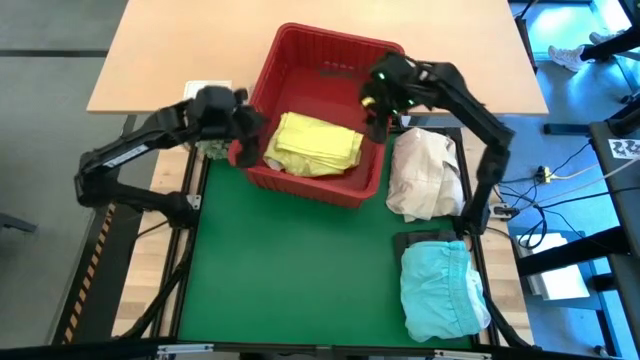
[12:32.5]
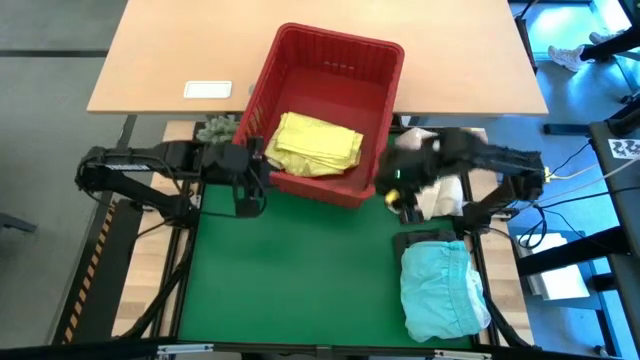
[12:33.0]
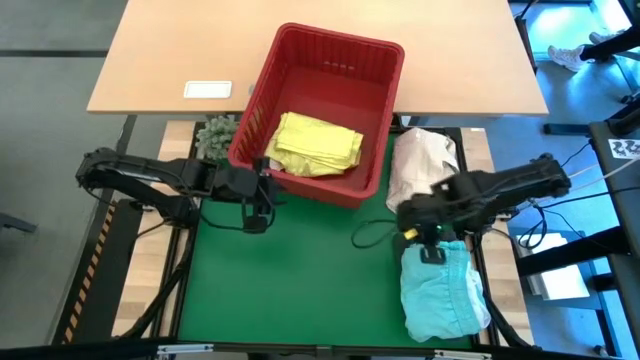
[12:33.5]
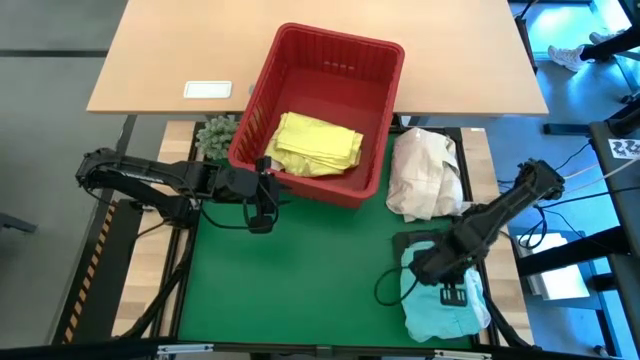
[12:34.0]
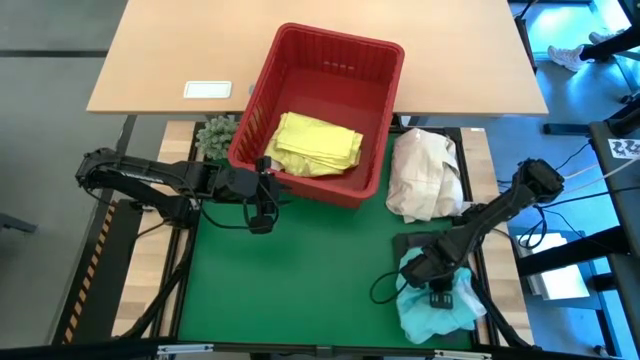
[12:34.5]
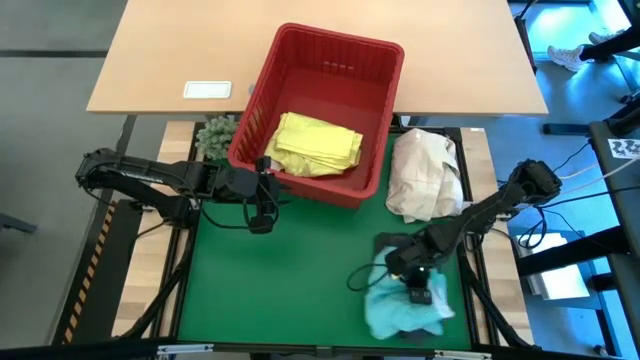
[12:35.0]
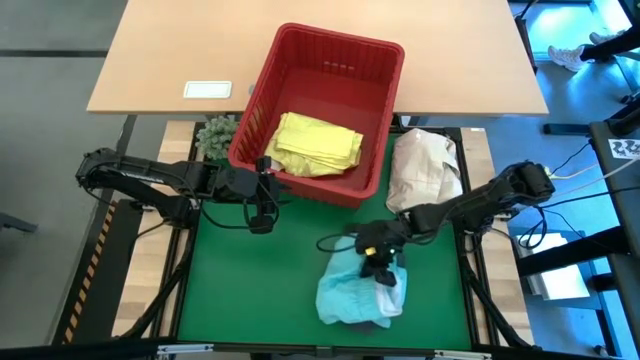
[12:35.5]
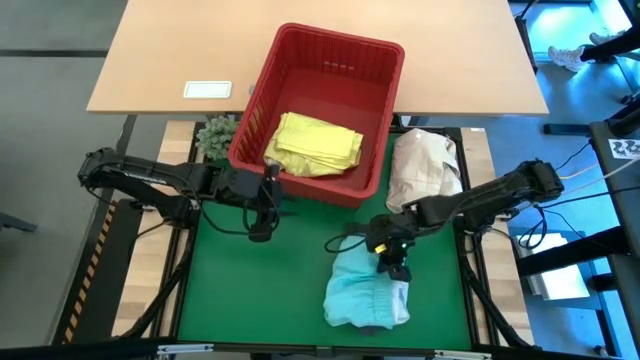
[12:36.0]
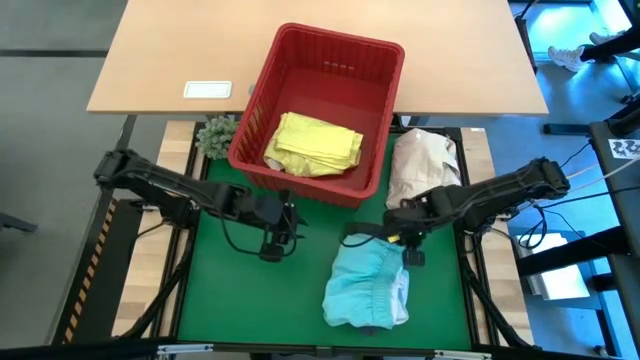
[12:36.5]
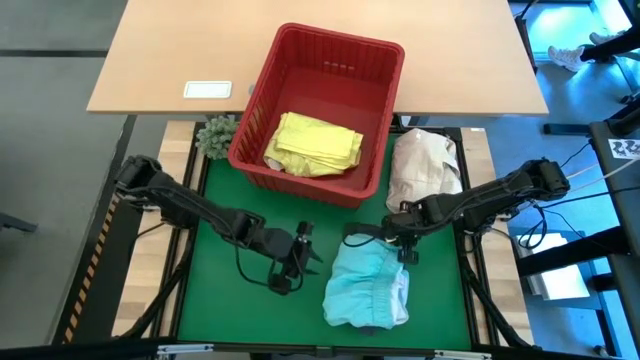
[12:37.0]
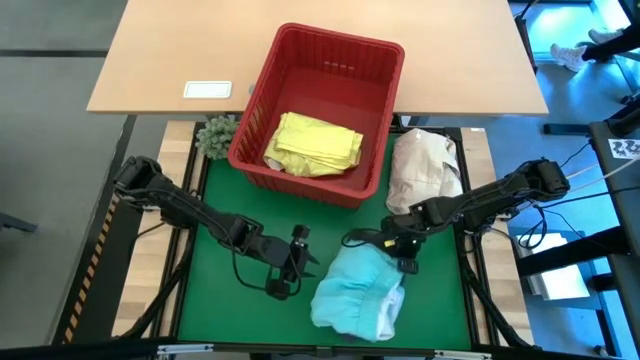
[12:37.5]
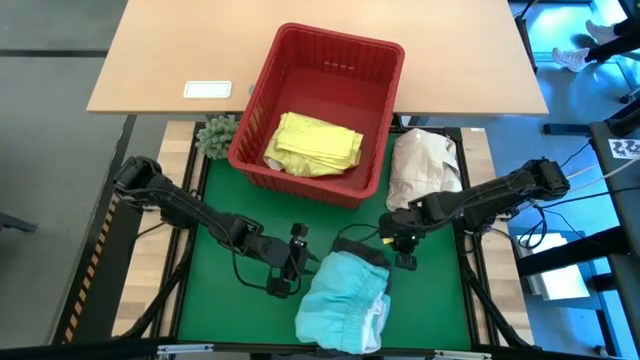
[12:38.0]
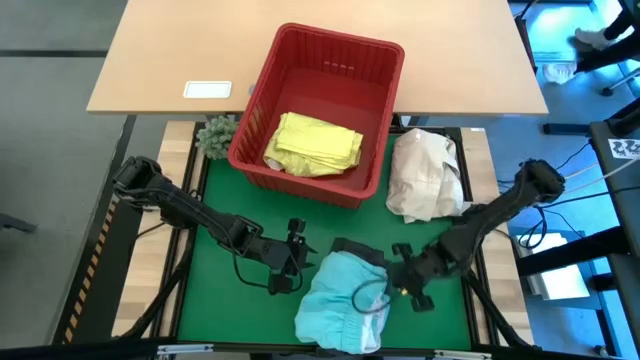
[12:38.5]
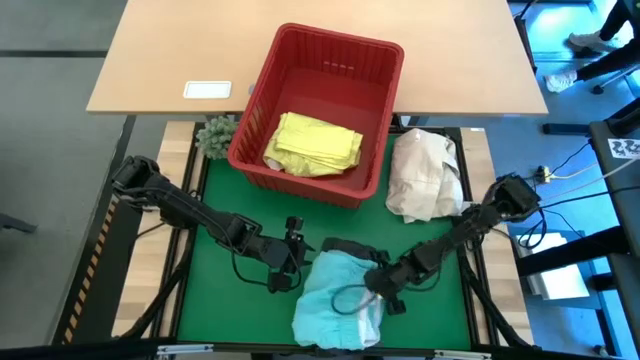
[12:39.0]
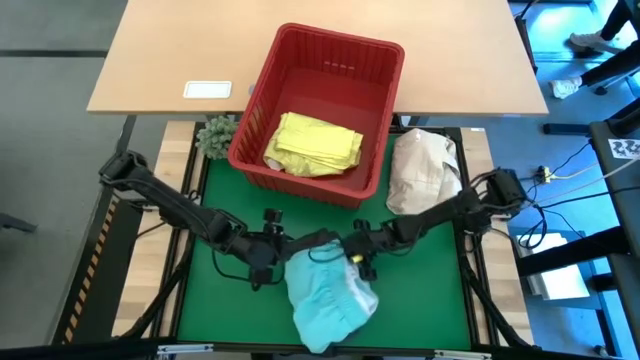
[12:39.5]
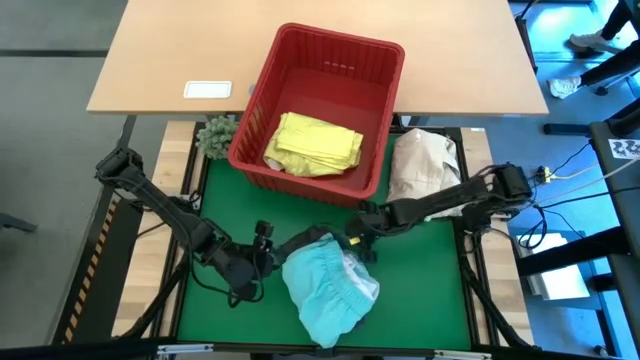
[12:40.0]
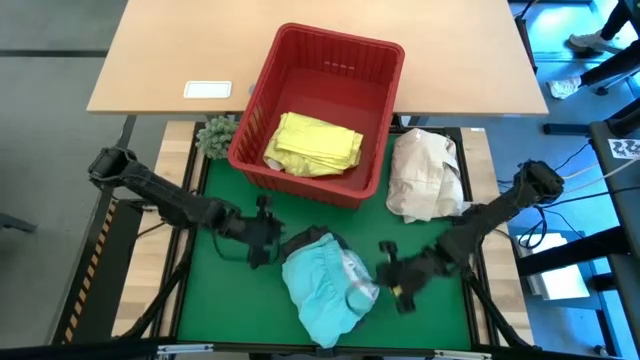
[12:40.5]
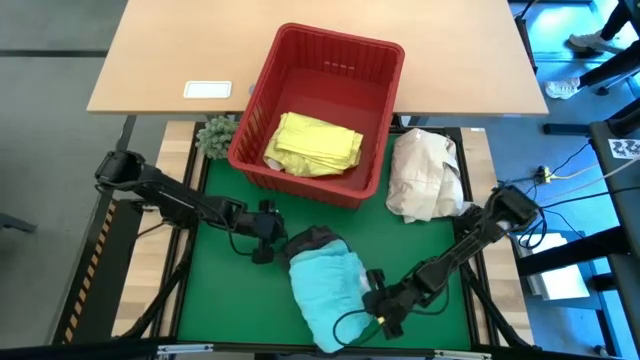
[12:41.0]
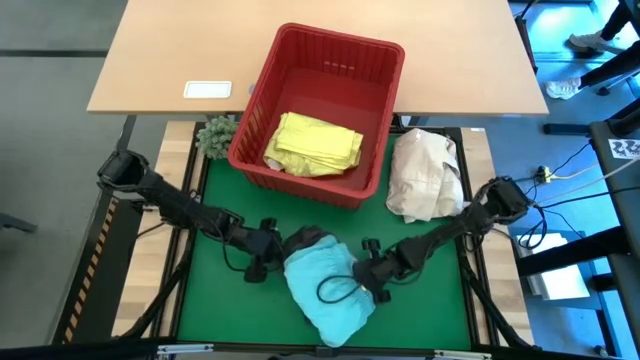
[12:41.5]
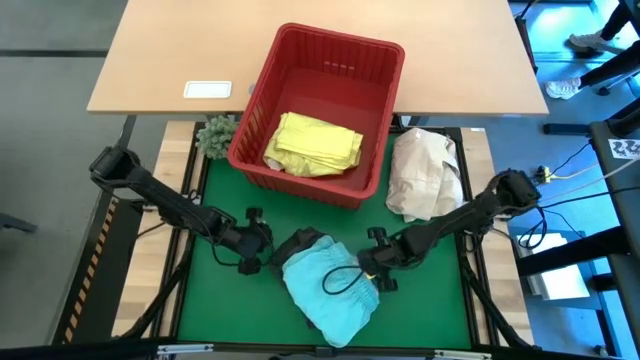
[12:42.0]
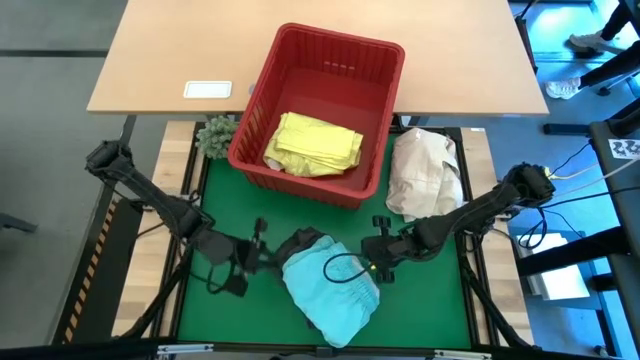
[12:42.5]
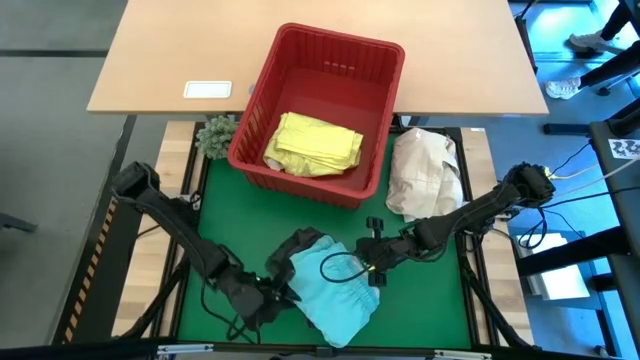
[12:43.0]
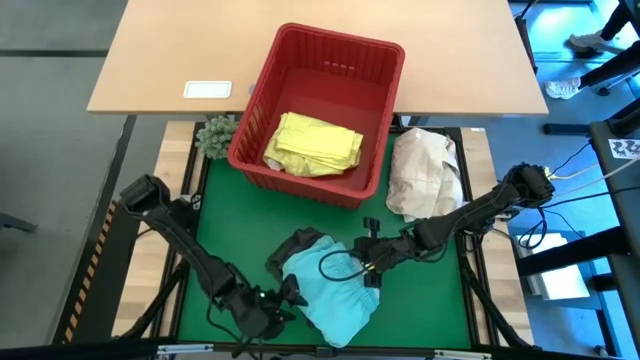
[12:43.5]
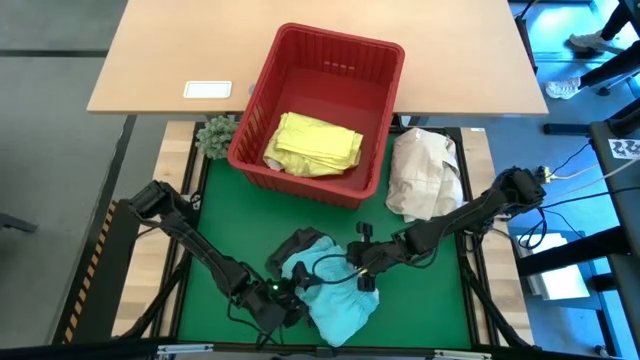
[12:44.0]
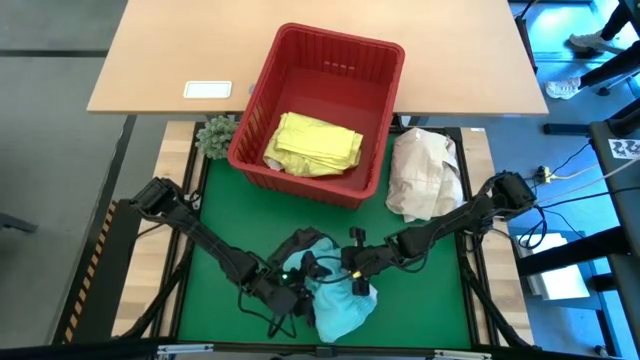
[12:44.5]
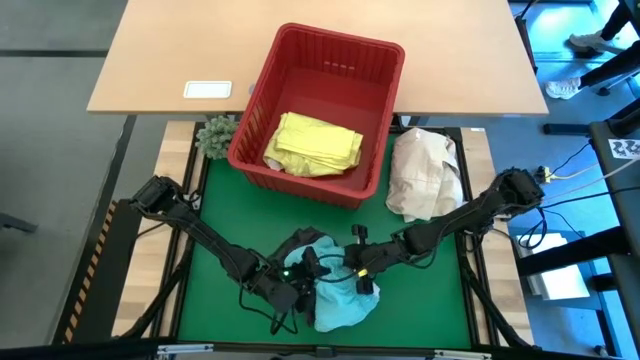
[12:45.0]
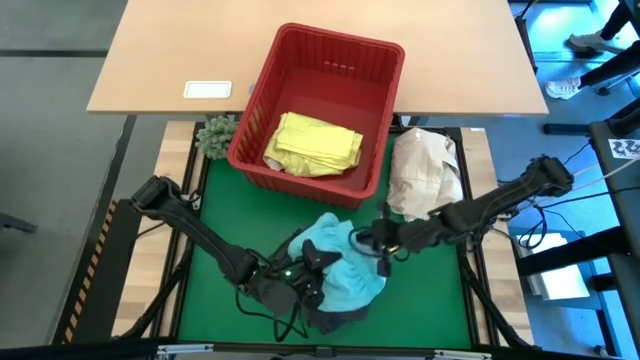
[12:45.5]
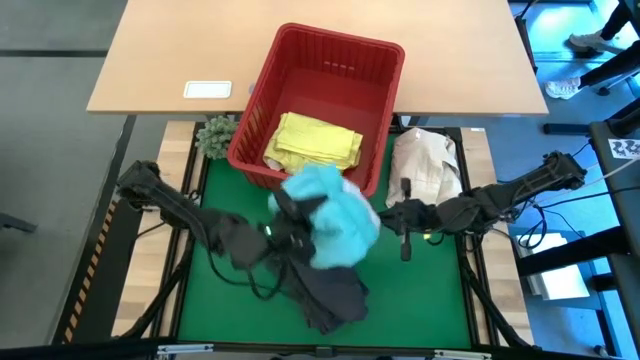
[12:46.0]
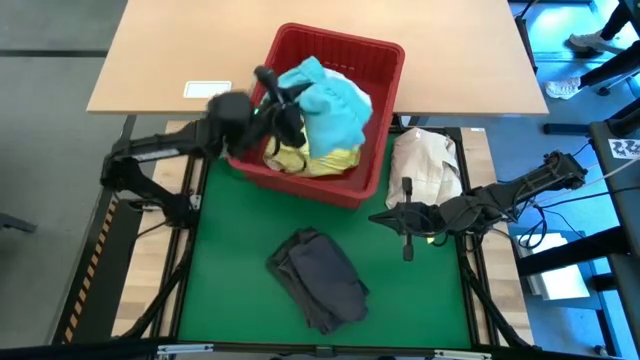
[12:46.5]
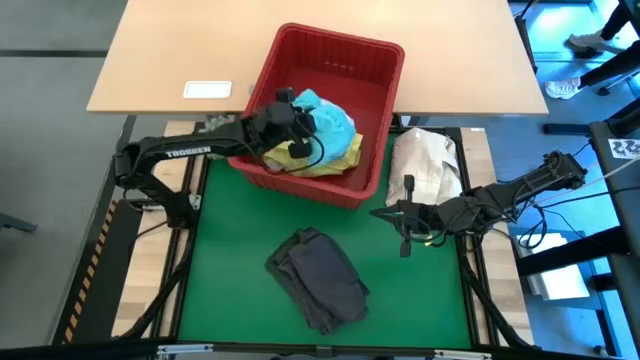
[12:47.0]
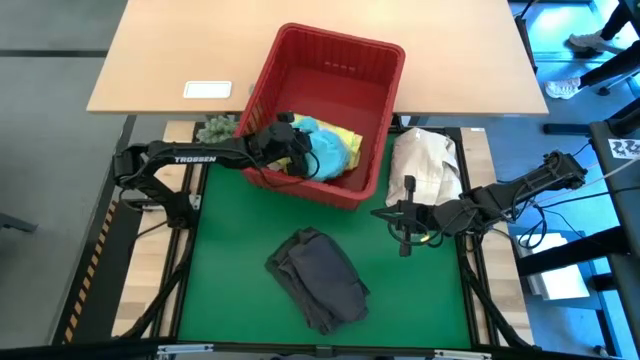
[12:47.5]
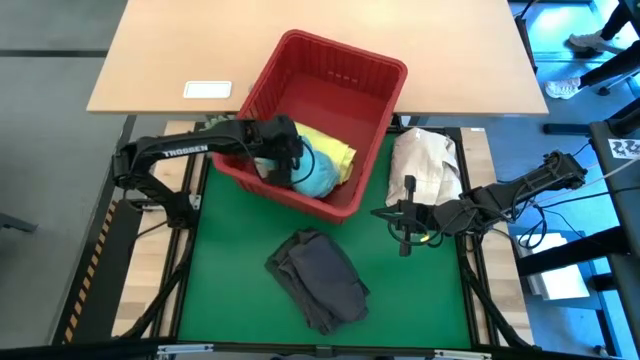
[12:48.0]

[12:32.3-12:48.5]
Task: Fold Laundry from Bin
Put the blue short into the red bin

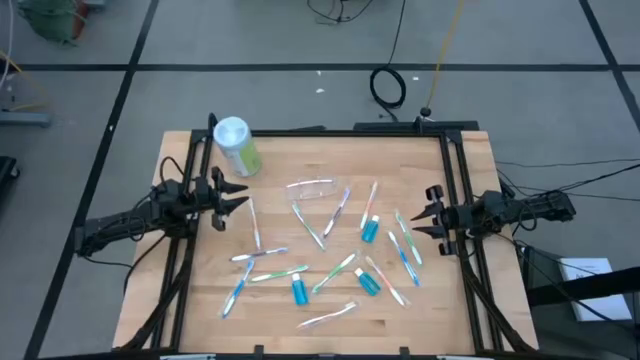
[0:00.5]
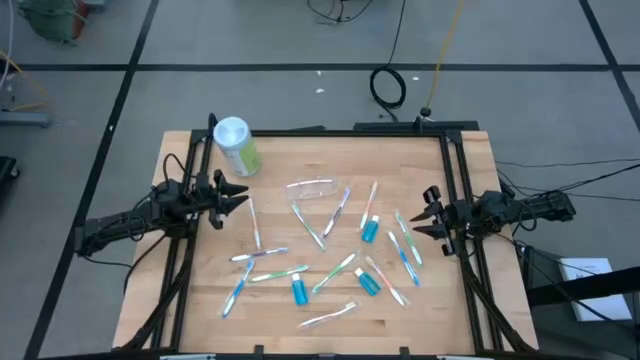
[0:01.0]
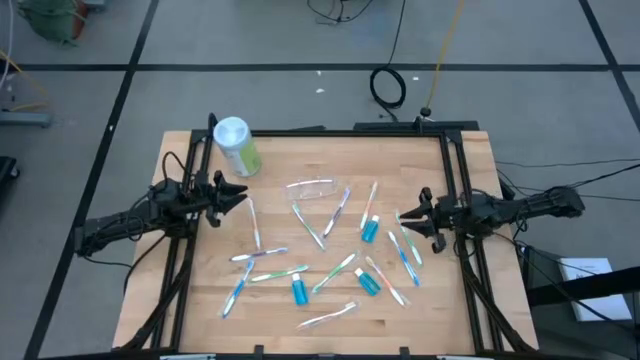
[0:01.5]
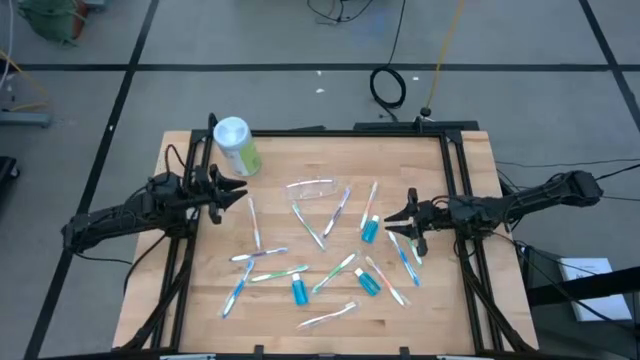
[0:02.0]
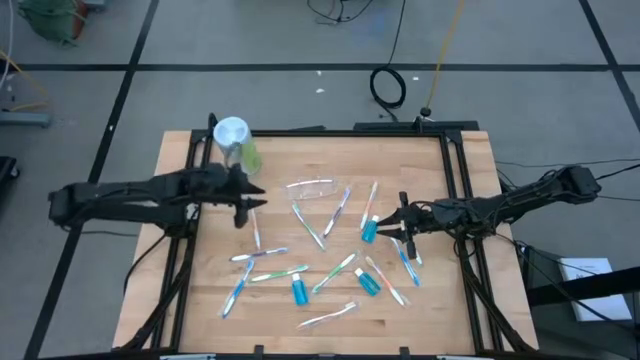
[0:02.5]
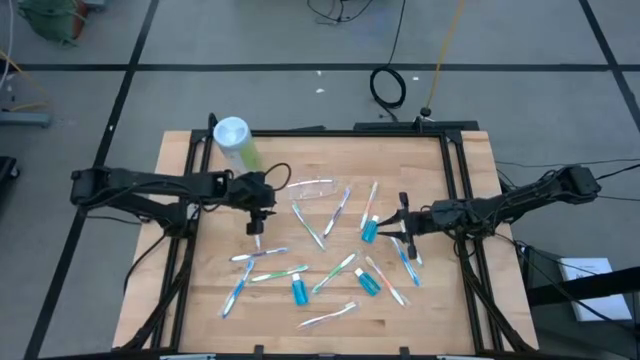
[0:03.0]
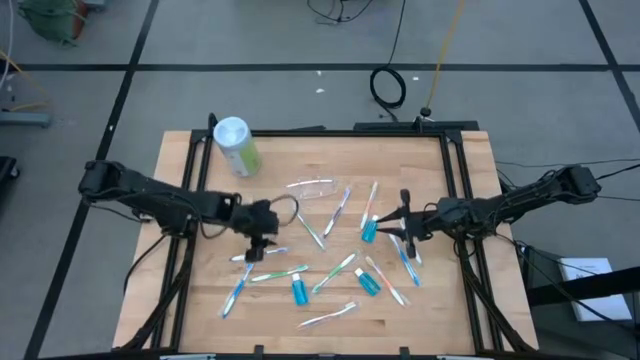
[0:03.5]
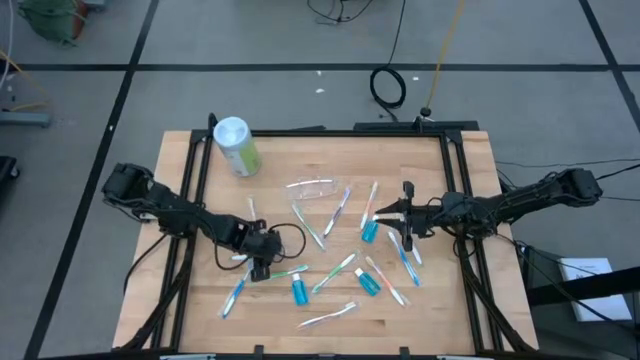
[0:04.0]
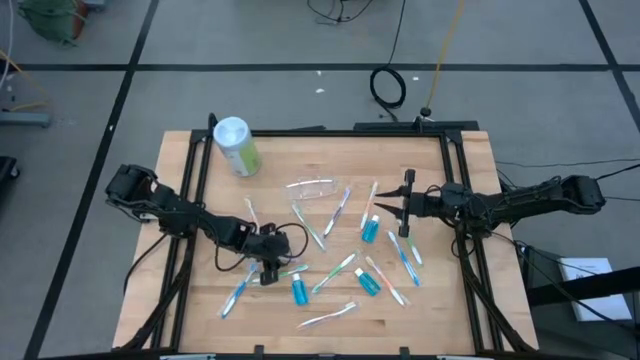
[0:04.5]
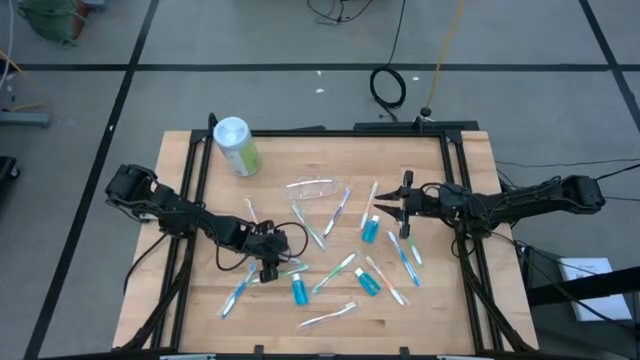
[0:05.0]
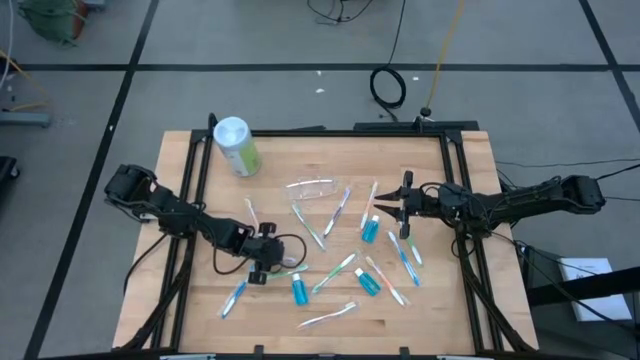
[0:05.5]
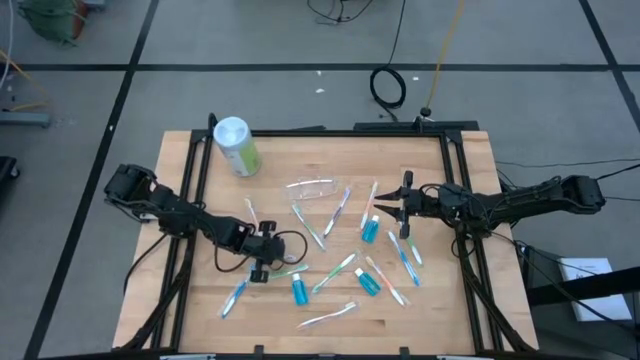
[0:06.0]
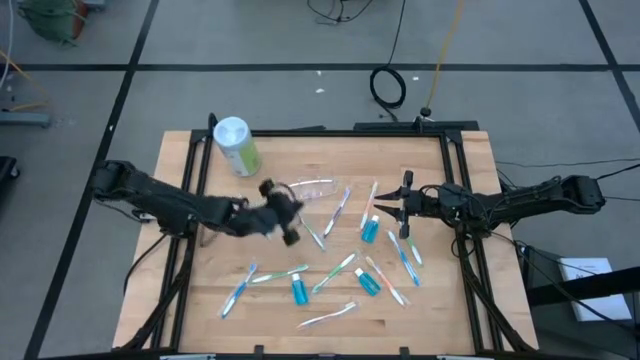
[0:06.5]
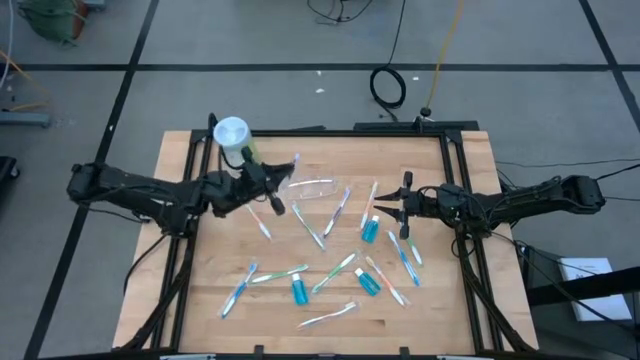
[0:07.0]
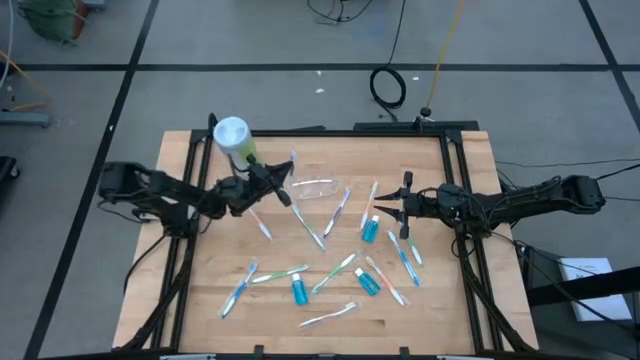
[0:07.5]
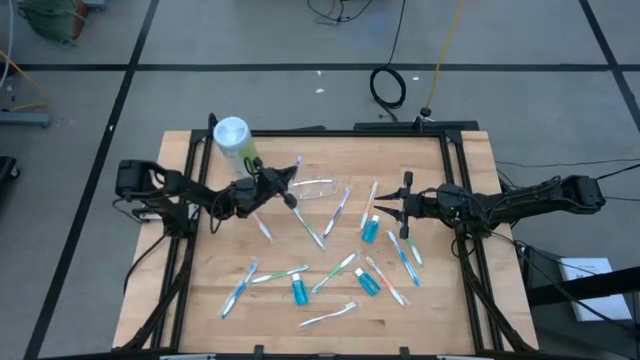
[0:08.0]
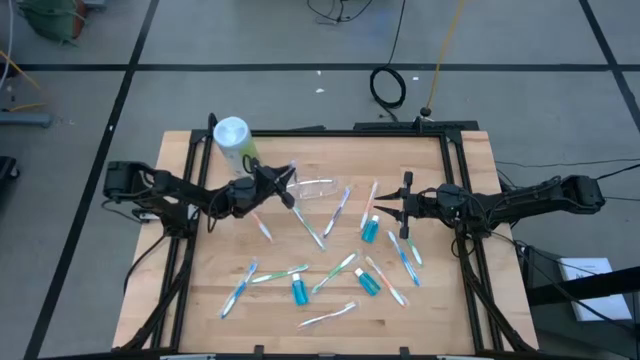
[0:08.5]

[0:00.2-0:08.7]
Task: Pick & Place toothbrushing station
Put the purple toothbrush into the transparent organizer
